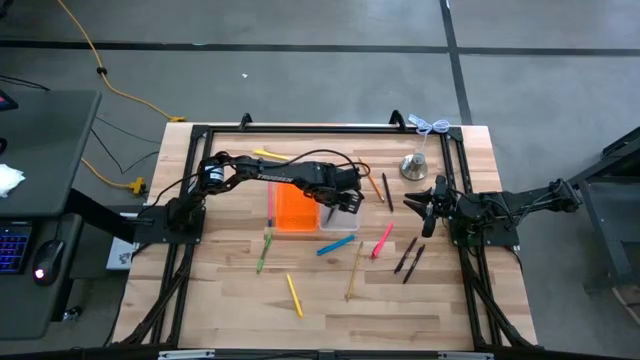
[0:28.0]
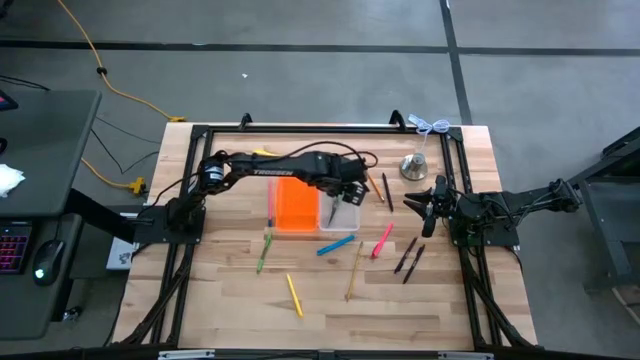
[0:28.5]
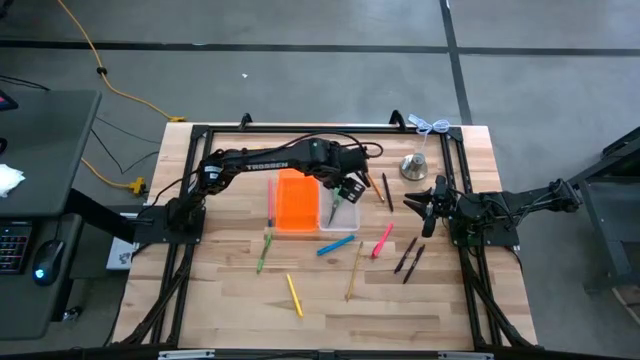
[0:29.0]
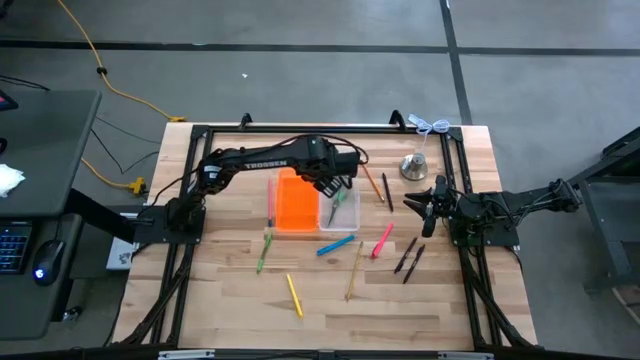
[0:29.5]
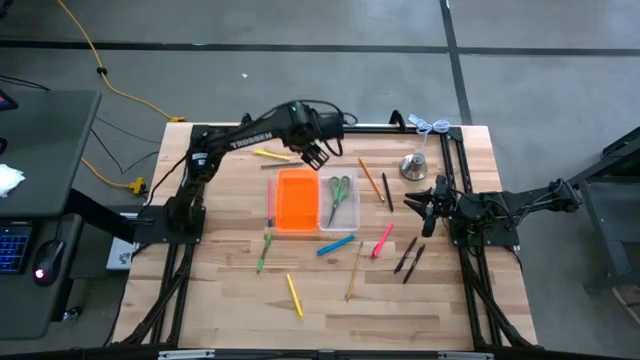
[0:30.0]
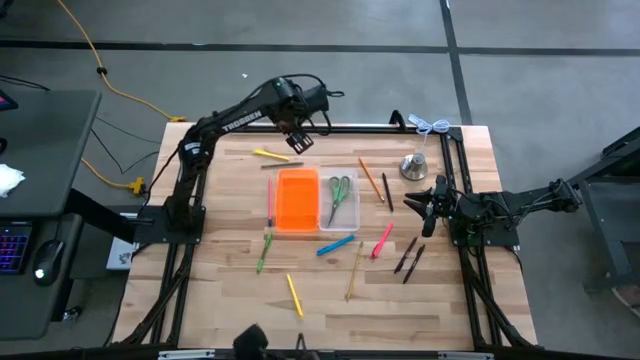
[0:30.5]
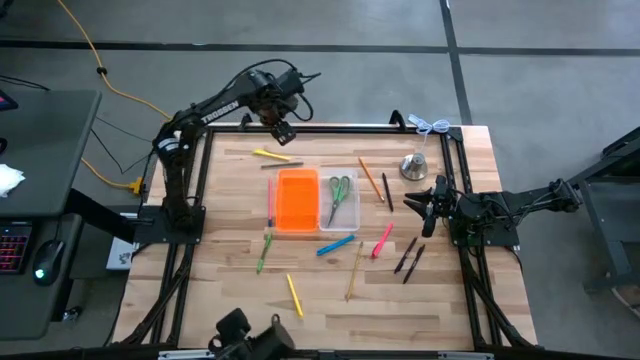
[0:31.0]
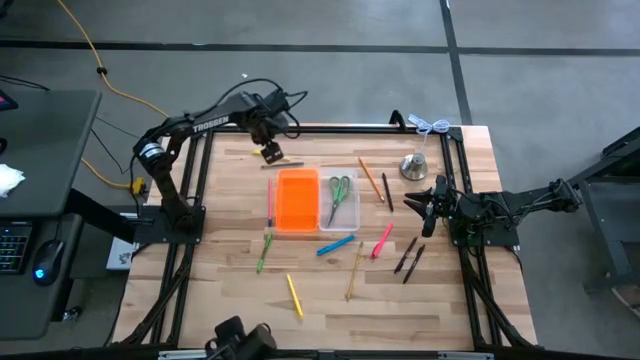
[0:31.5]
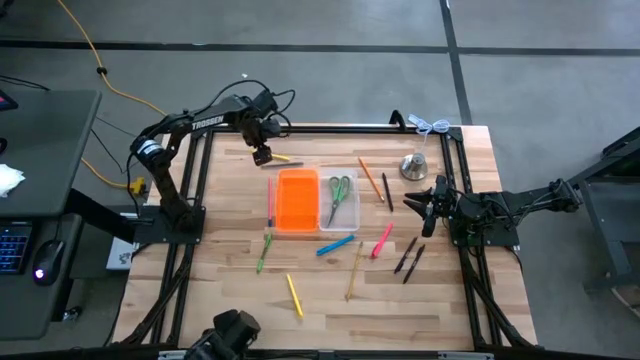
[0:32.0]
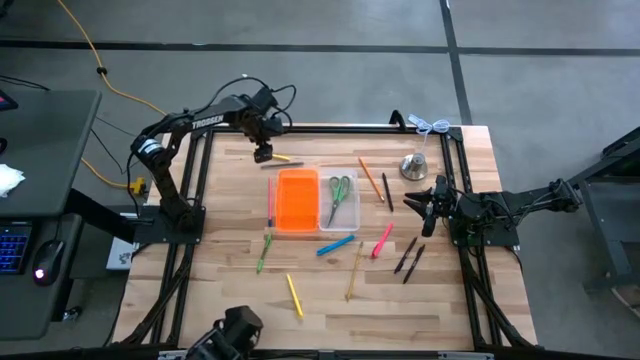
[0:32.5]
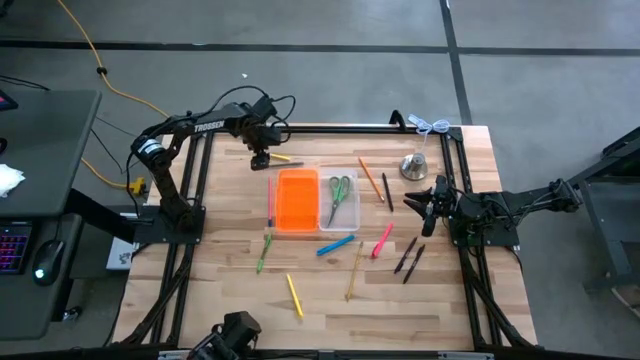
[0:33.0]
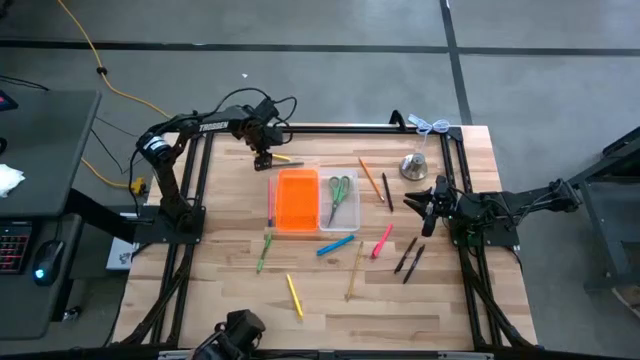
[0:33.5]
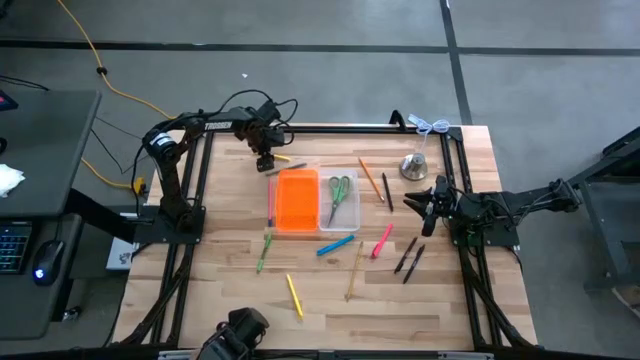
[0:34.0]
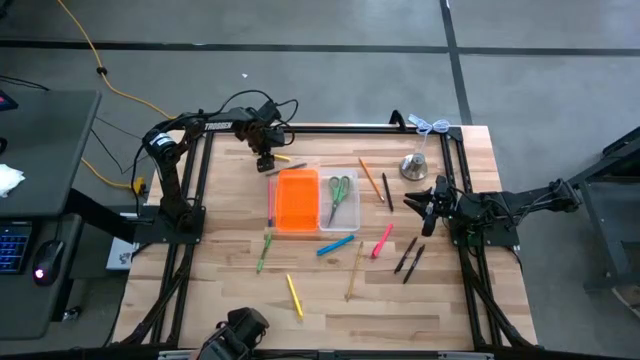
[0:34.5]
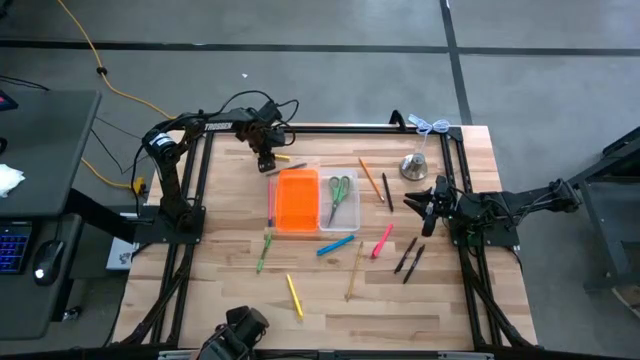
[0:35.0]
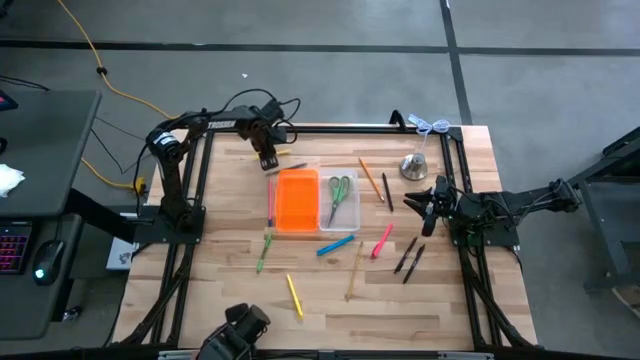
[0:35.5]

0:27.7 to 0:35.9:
Task: Pick & place school supplies into a supply box
Put the yellow pen into the supply box

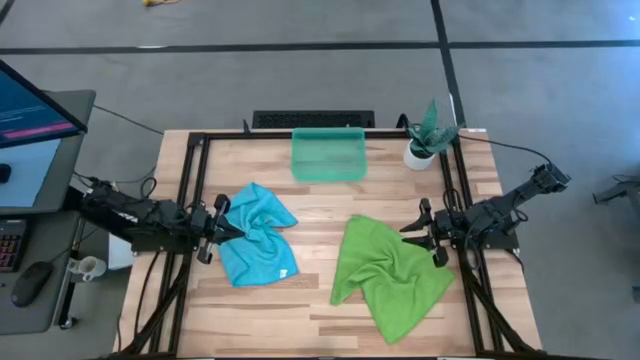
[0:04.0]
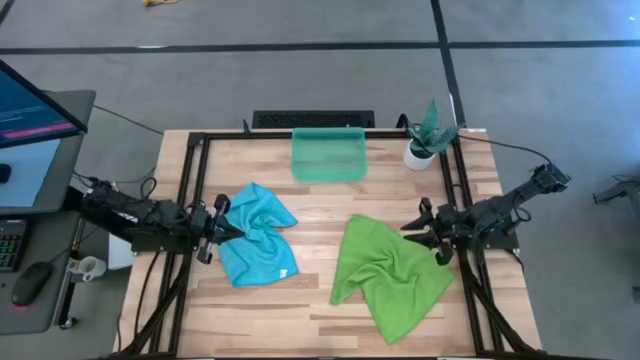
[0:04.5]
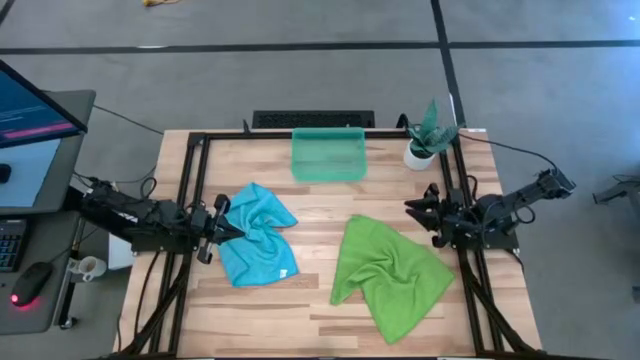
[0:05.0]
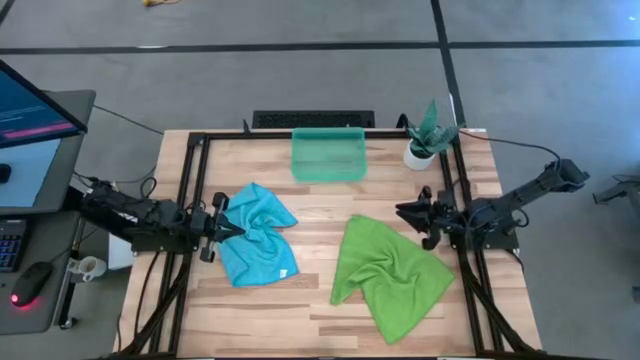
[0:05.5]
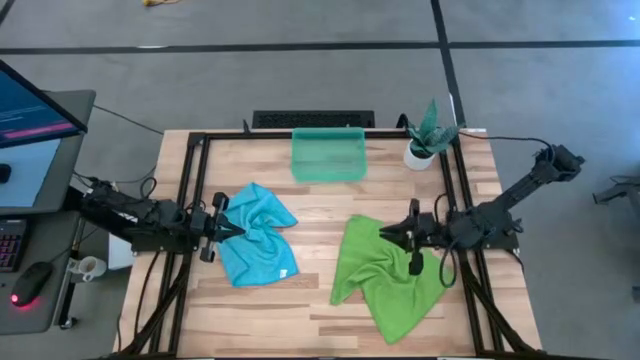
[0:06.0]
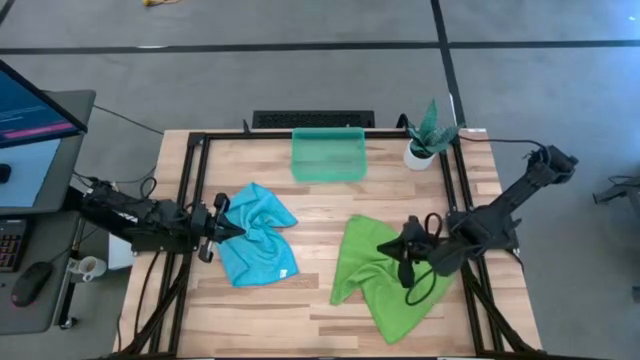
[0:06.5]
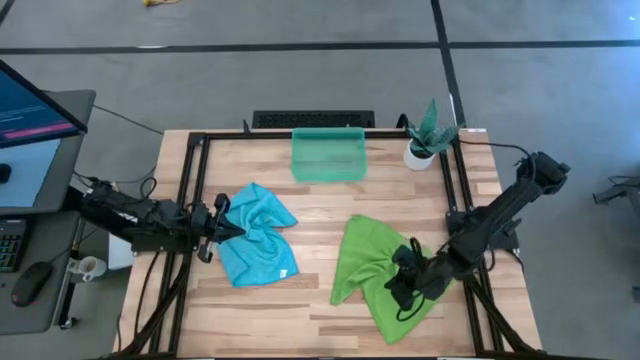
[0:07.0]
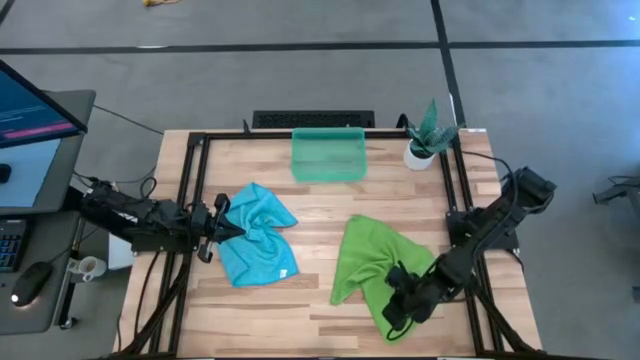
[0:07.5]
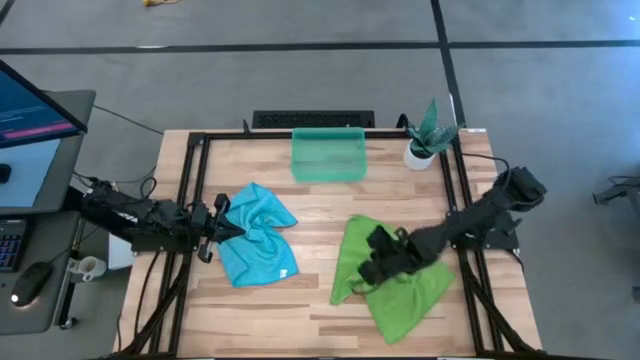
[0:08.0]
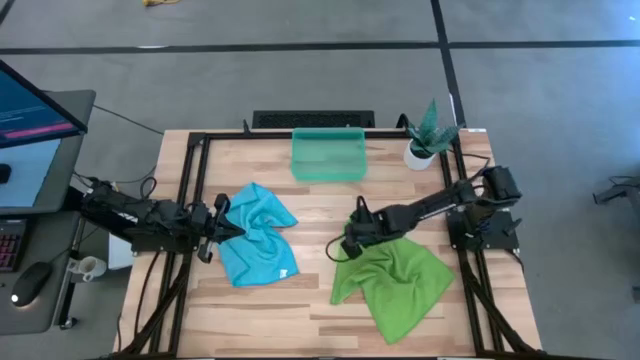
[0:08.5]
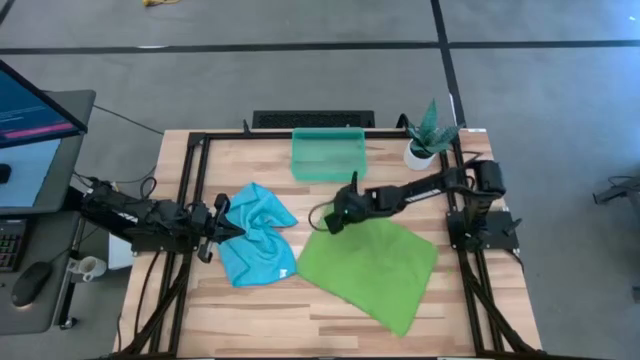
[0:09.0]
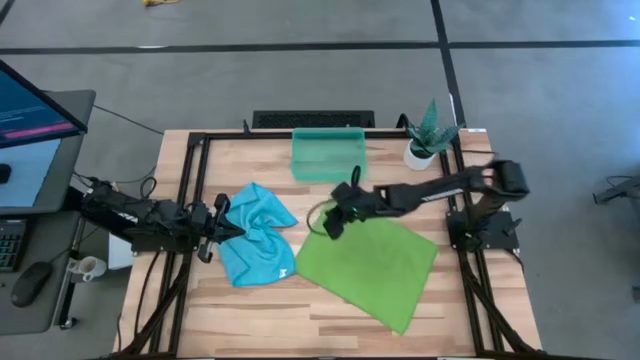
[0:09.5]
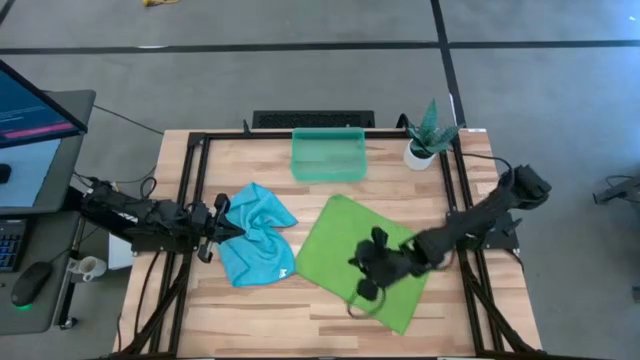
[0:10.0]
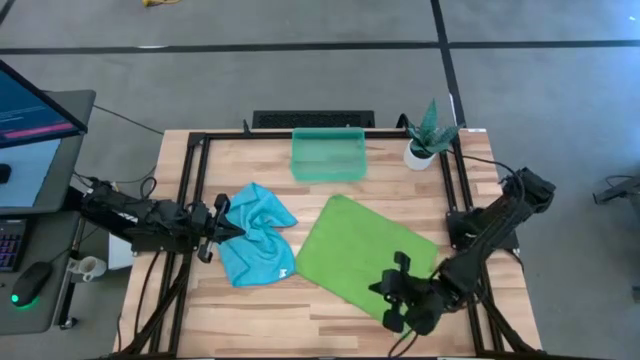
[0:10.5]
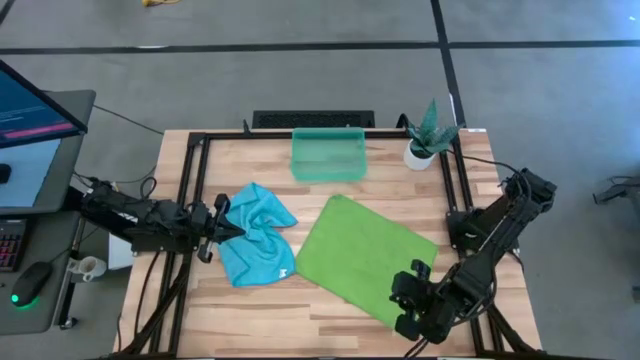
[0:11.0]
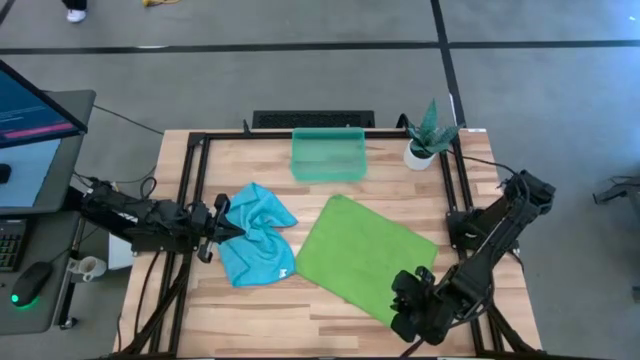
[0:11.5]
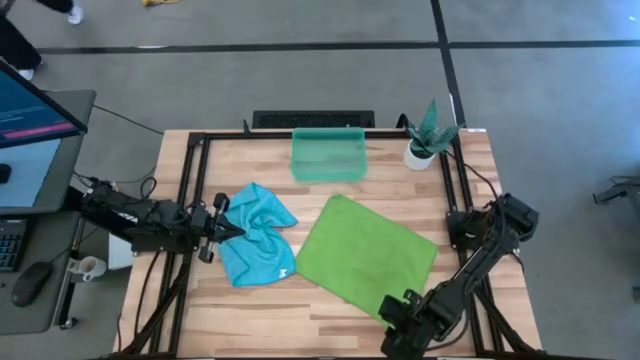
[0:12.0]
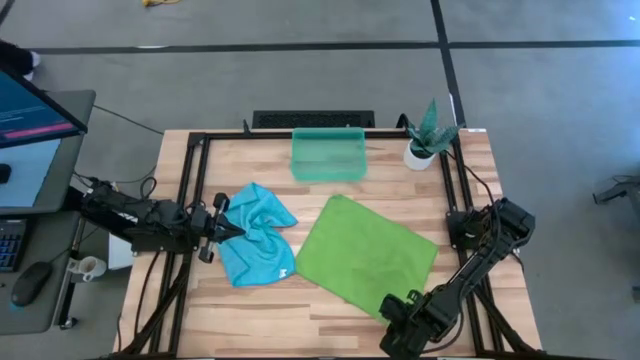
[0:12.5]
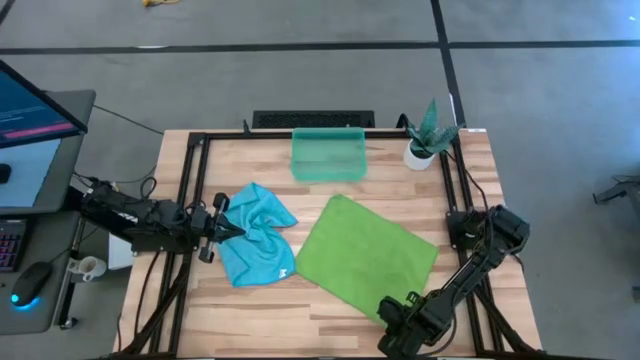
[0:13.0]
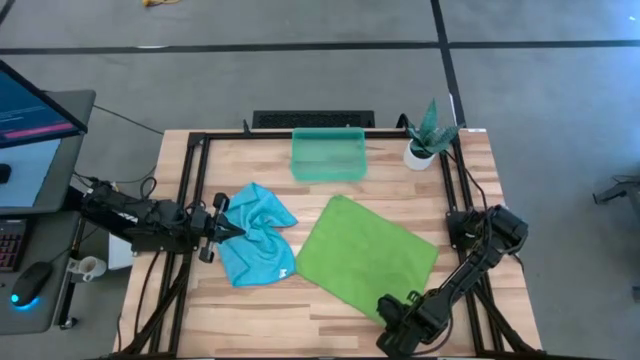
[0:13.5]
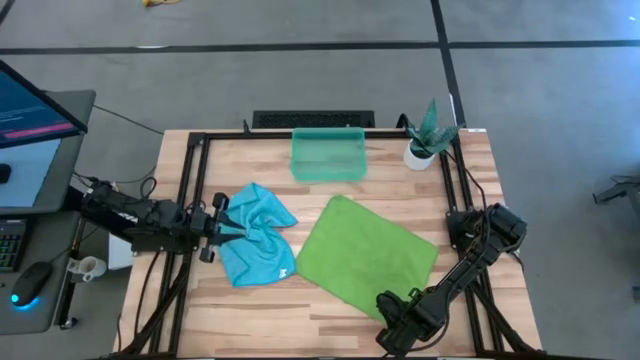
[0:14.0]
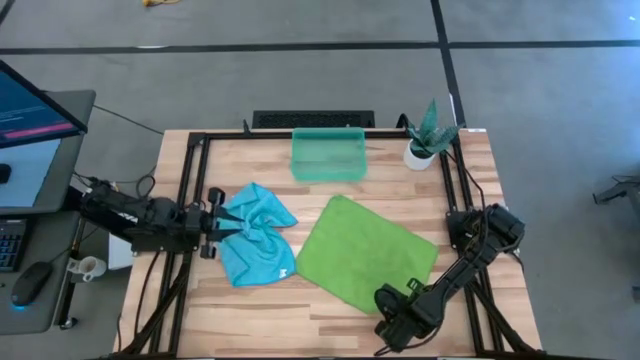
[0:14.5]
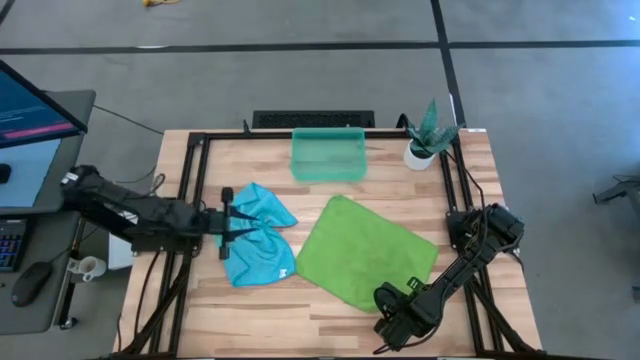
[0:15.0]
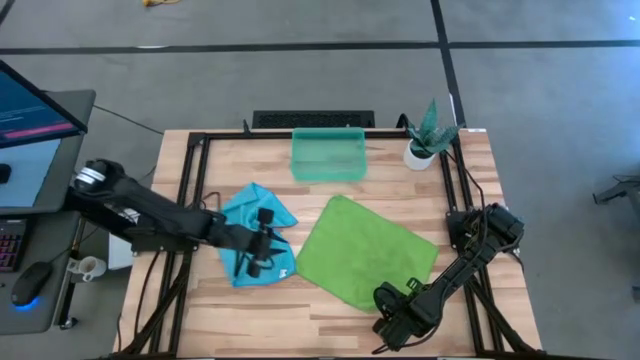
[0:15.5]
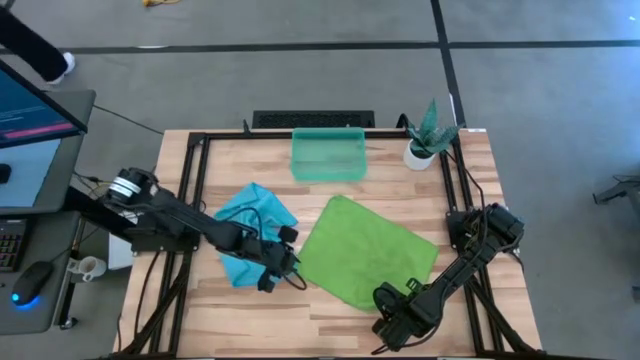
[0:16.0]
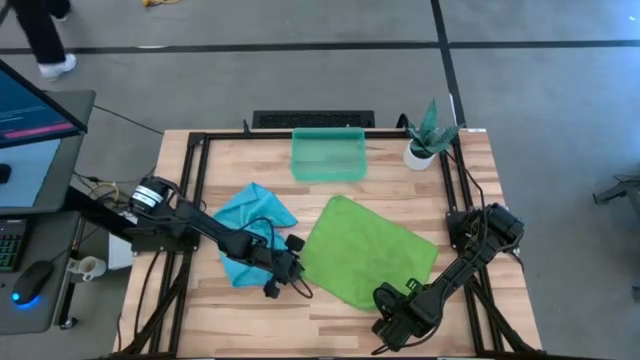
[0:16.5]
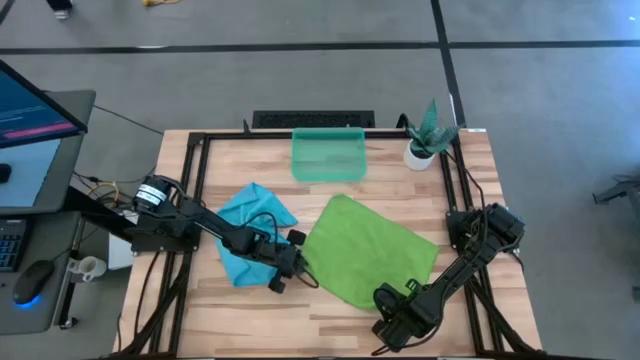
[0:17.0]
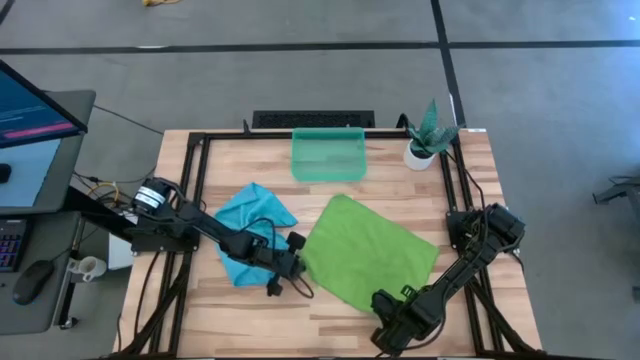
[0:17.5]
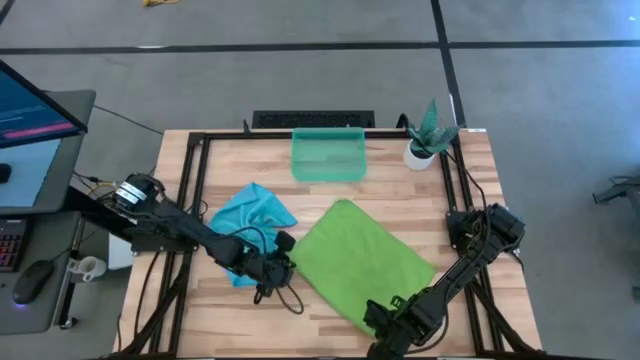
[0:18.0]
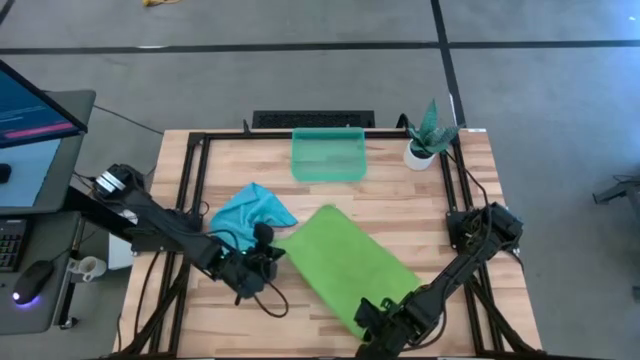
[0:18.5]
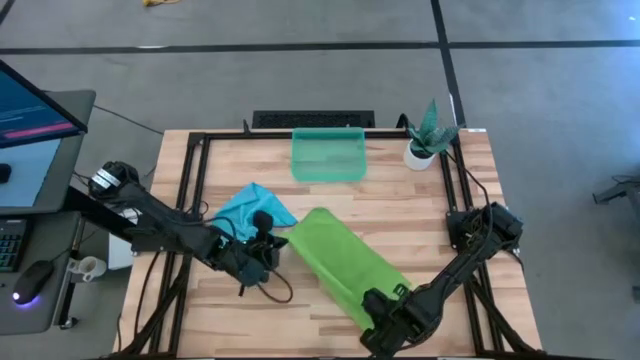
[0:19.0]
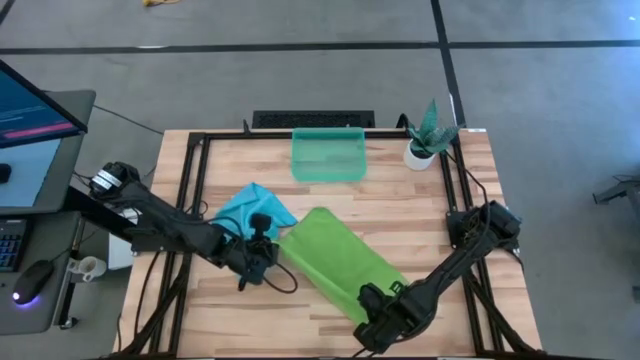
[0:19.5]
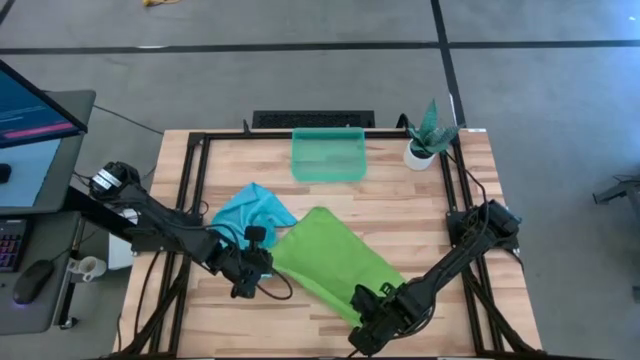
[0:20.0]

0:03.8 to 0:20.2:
Task: Roll microfiber towels into tight, uniform cylinder then place into a basket
Fold the green microfiber cloth
